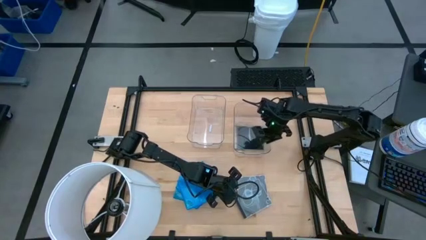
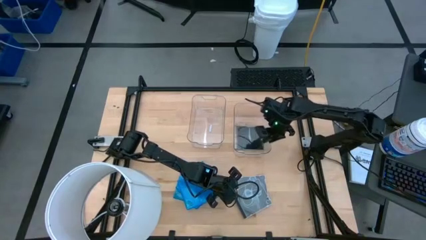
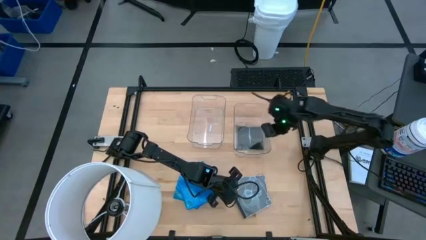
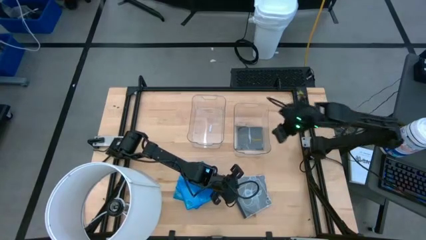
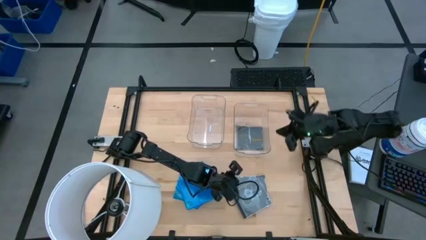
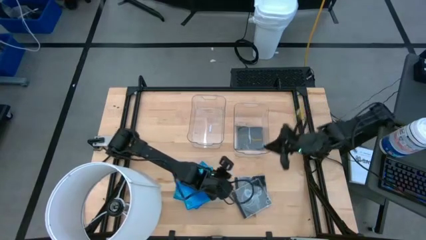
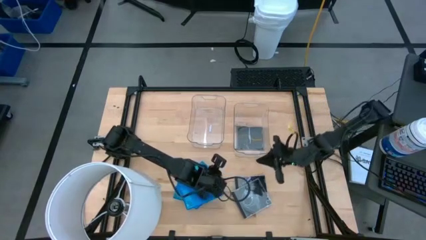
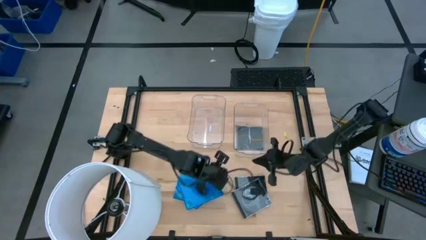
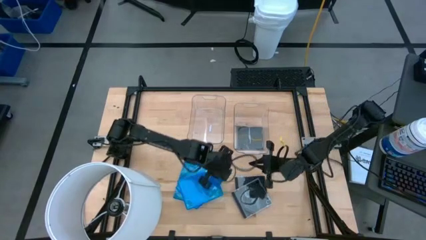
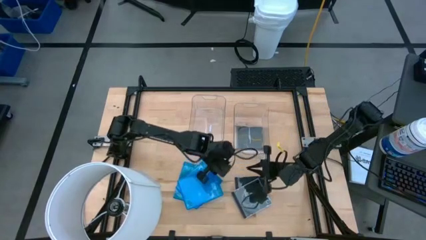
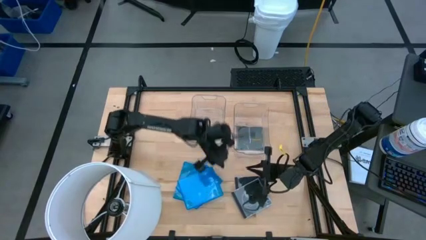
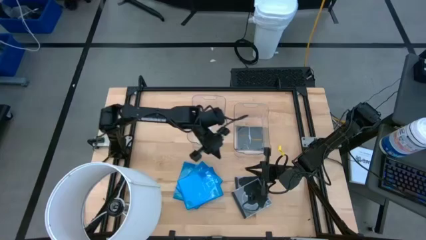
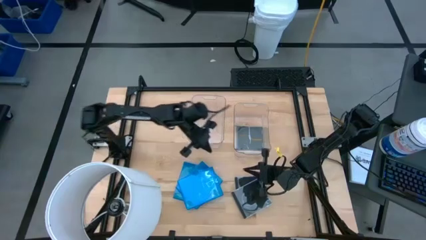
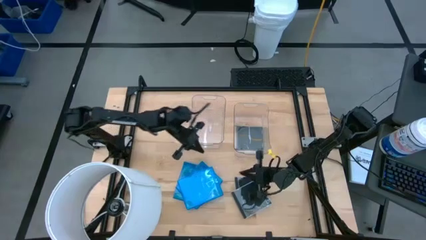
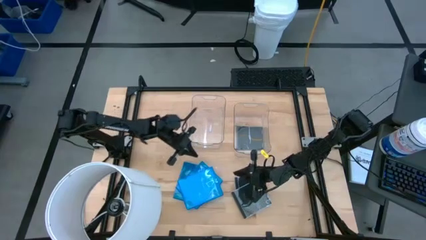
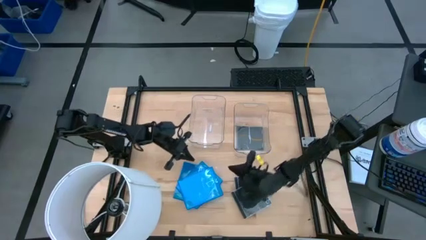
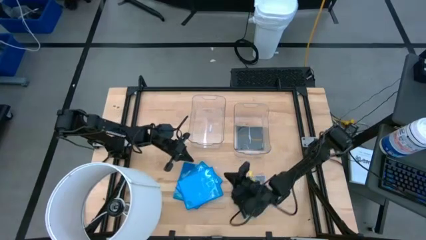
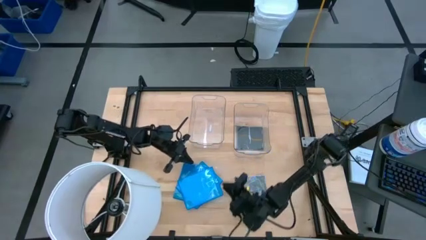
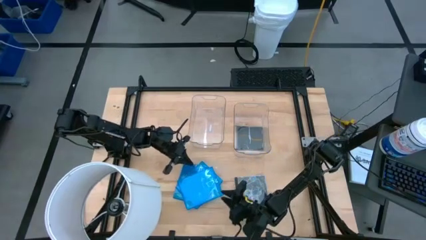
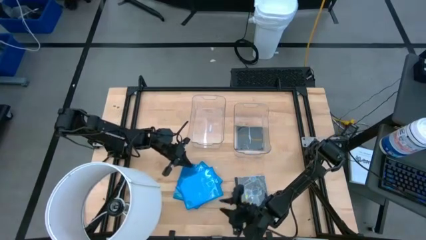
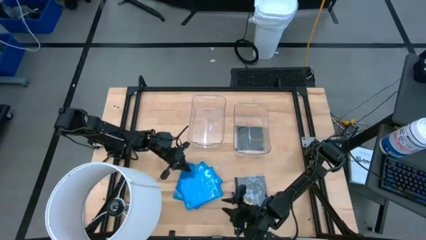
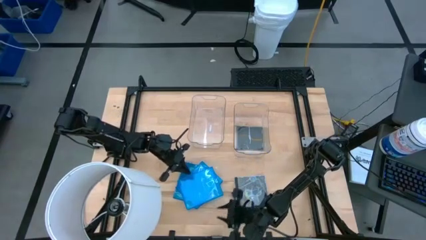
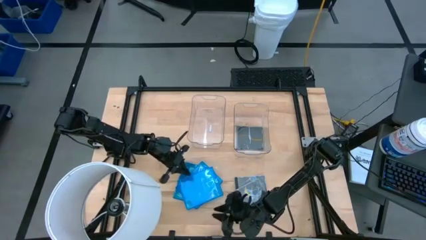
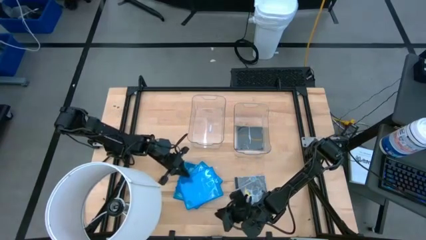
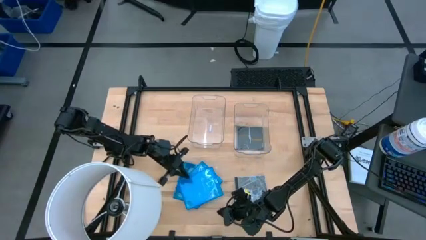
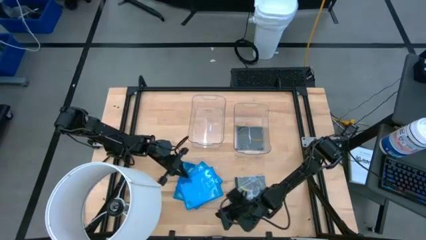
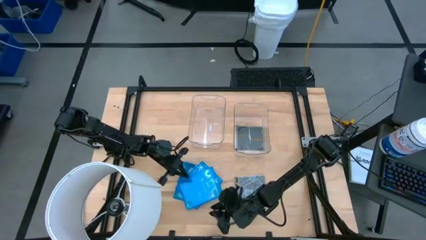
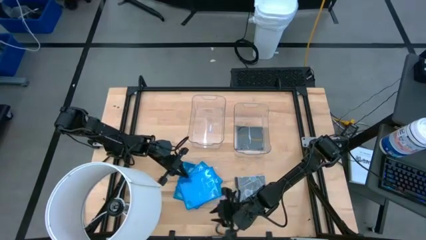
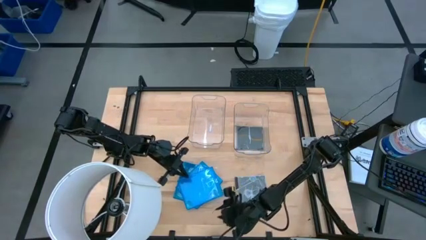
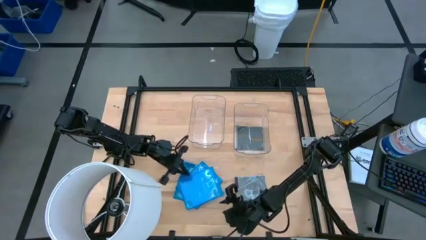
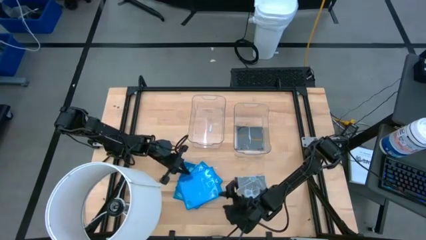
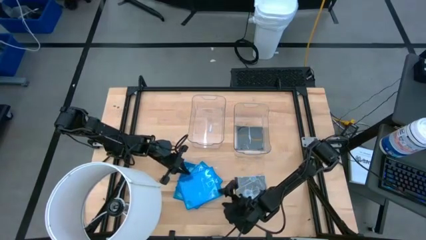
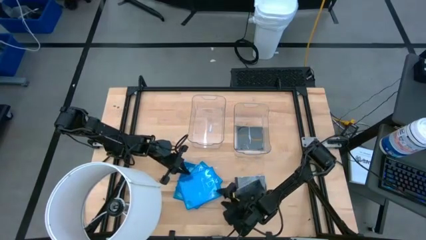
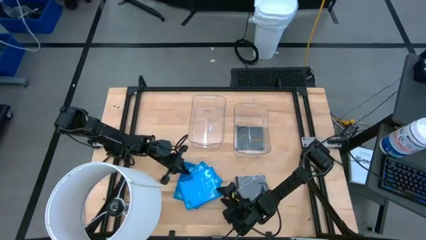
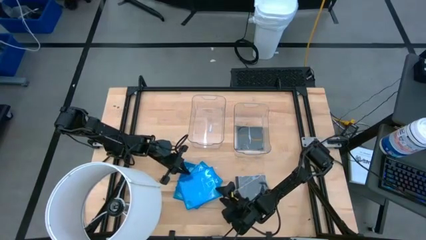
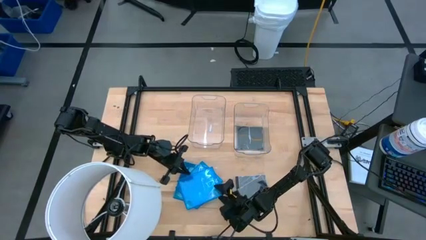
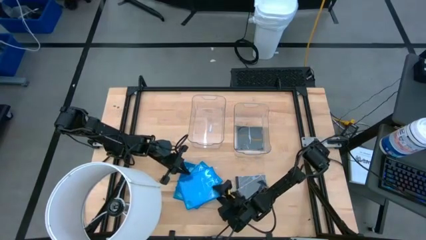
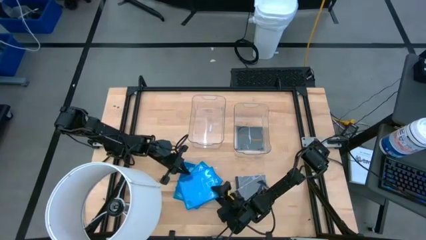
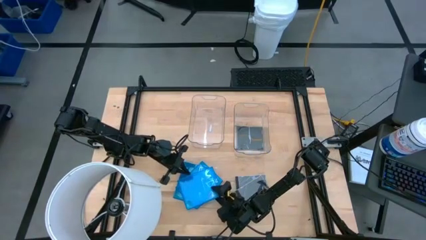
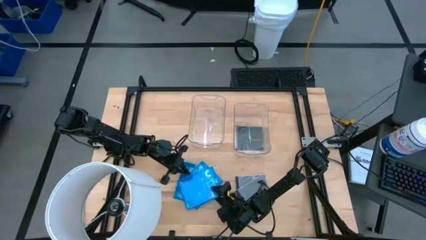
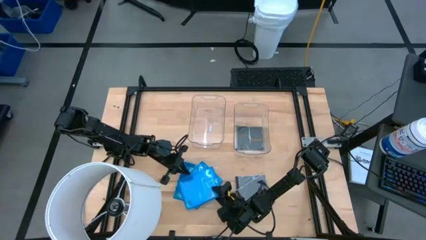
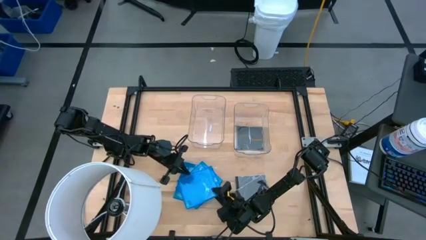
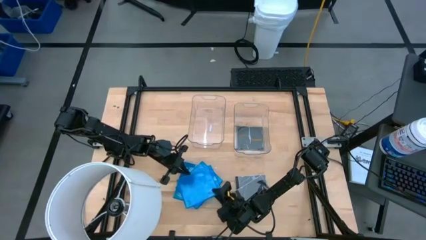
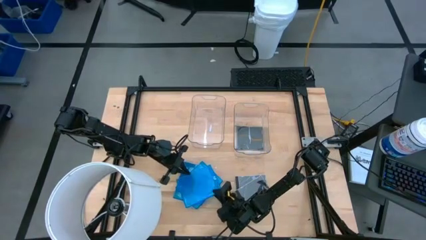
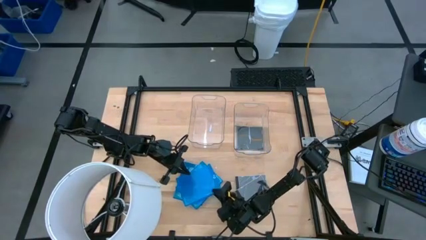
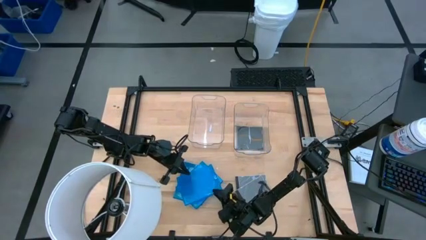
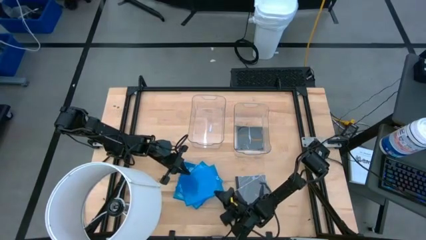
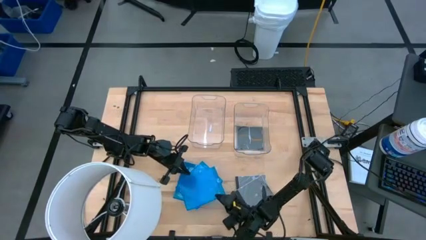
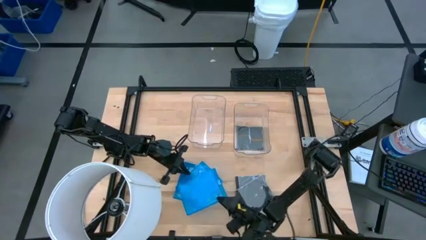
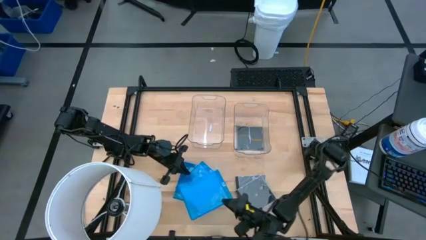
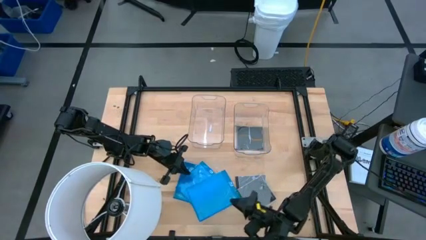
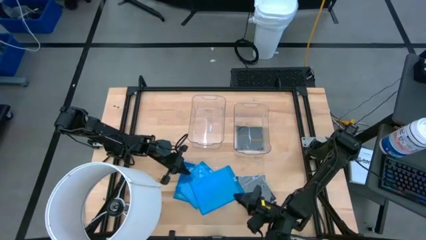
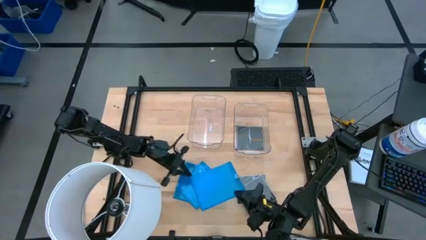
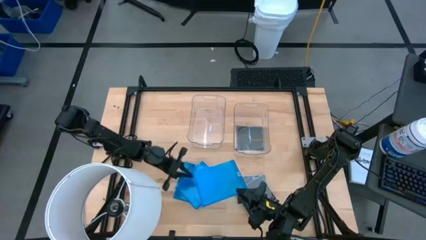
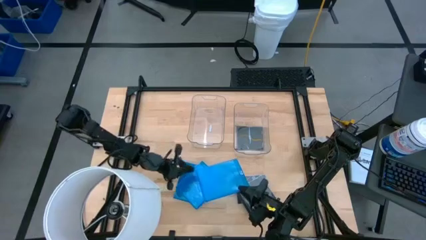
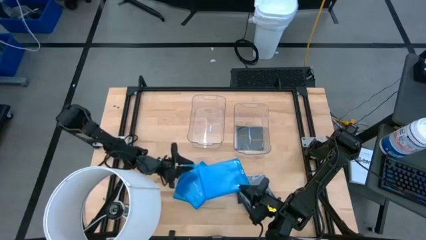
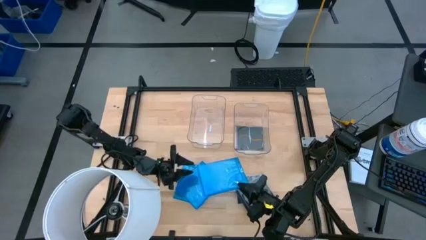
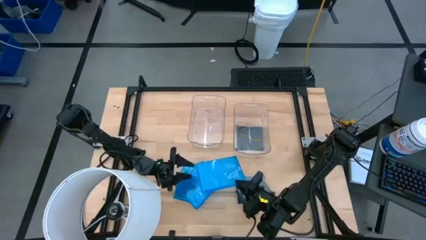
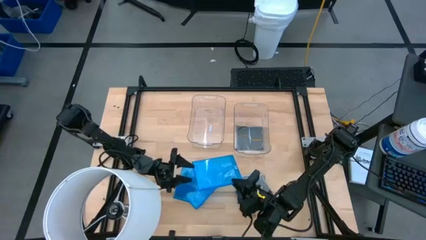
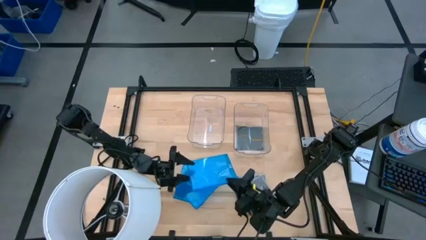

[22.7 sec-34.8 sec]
Task: Pick & place jewel cases by type
Put the blue CD case into the left transparent bin
